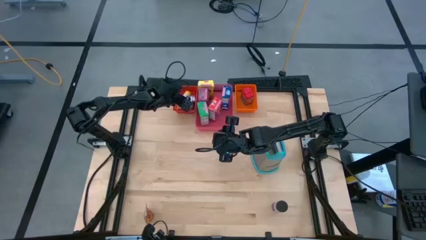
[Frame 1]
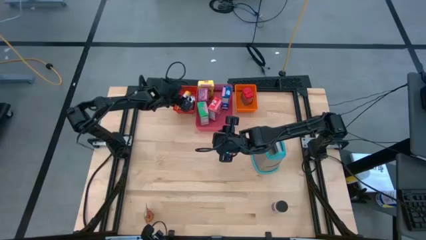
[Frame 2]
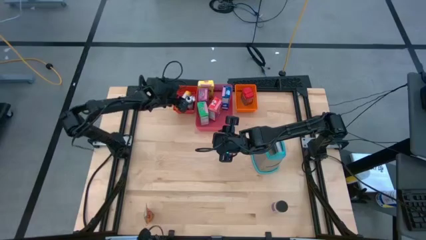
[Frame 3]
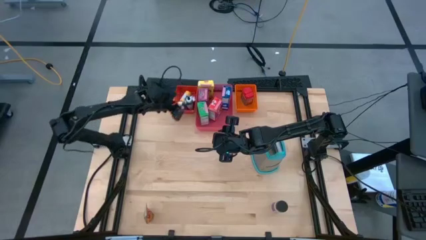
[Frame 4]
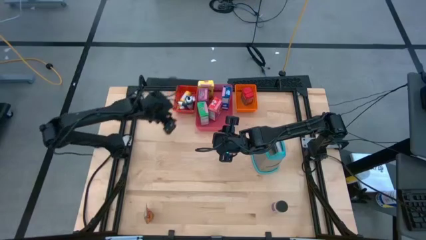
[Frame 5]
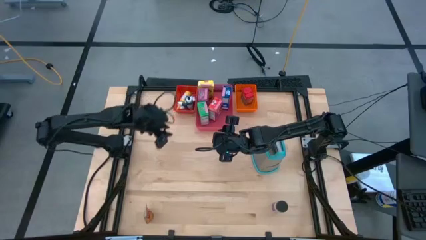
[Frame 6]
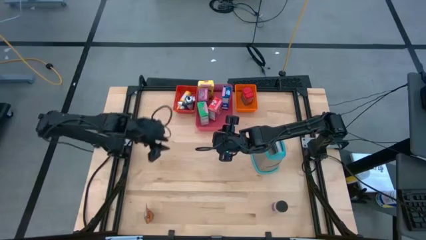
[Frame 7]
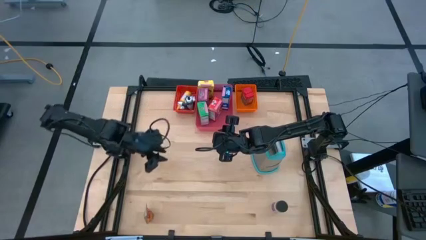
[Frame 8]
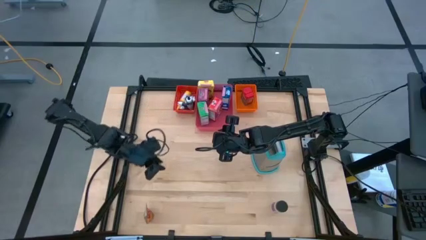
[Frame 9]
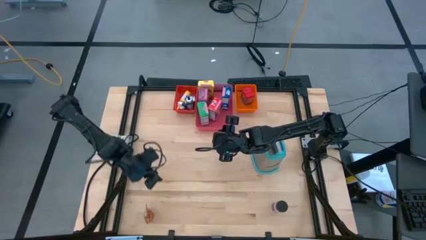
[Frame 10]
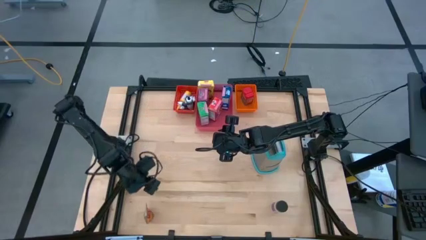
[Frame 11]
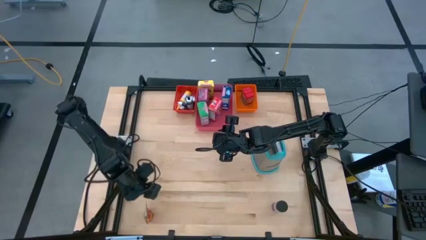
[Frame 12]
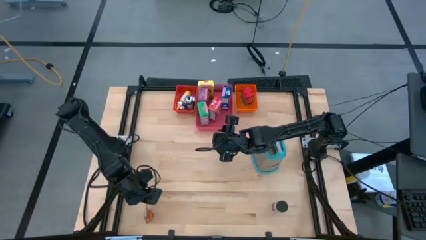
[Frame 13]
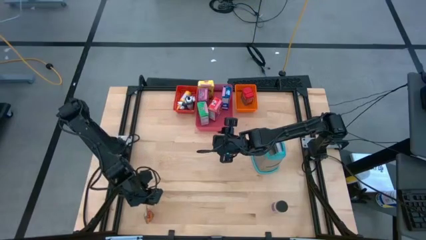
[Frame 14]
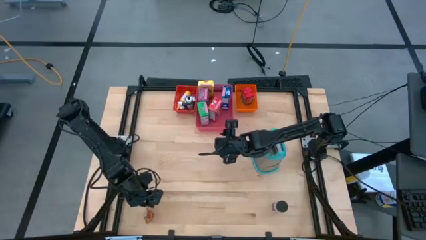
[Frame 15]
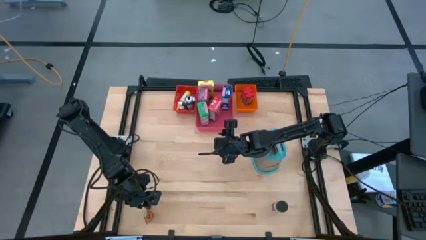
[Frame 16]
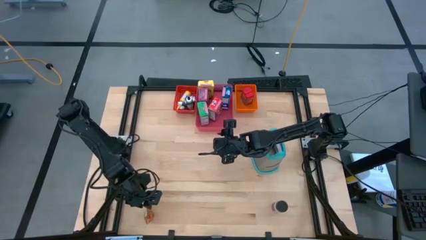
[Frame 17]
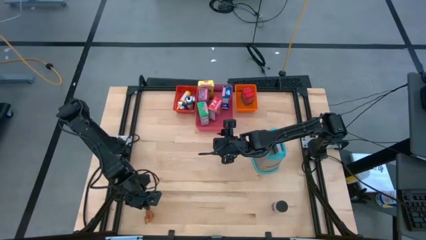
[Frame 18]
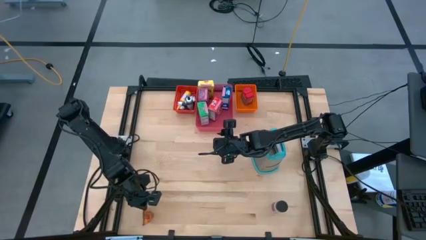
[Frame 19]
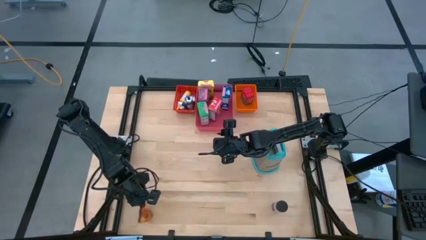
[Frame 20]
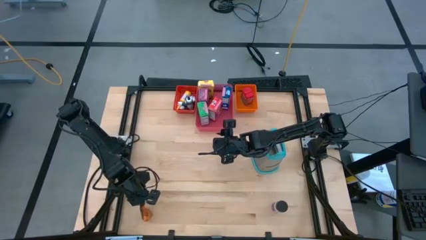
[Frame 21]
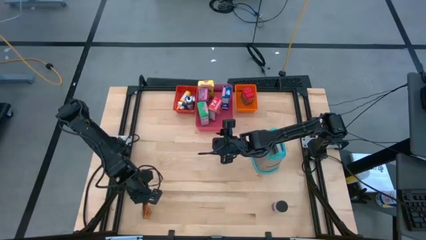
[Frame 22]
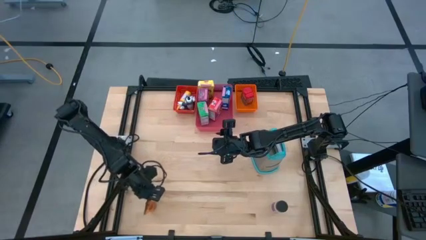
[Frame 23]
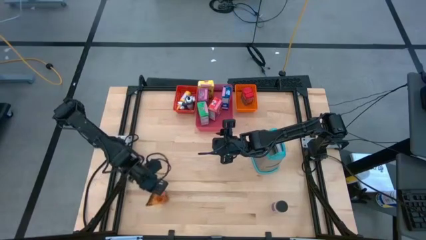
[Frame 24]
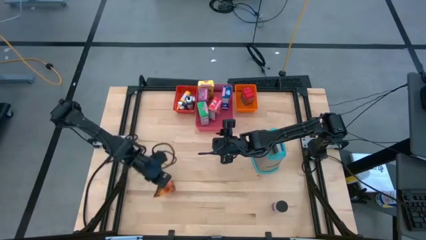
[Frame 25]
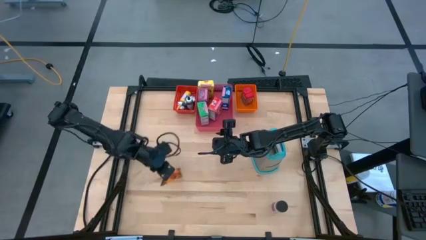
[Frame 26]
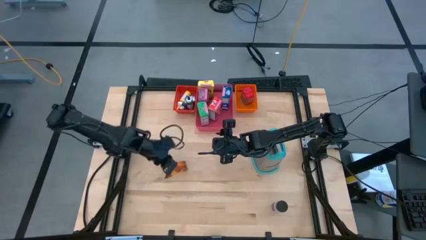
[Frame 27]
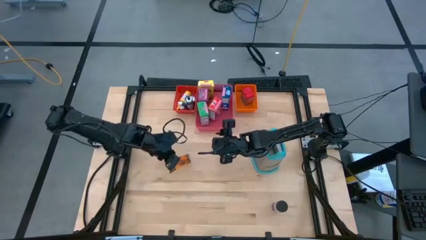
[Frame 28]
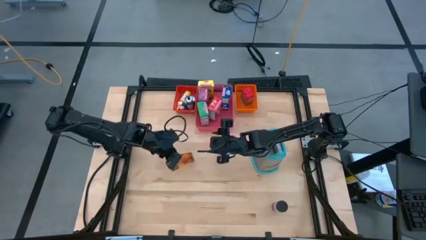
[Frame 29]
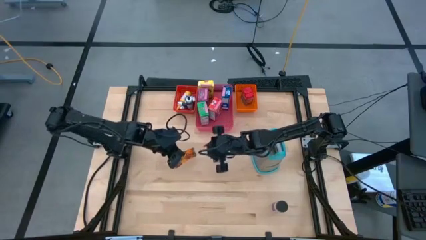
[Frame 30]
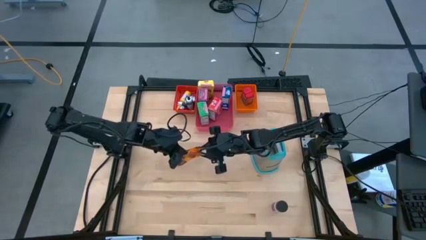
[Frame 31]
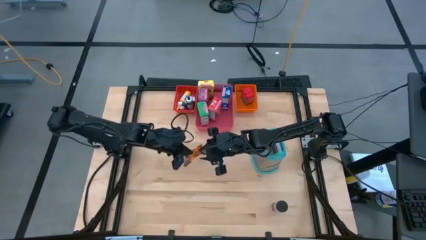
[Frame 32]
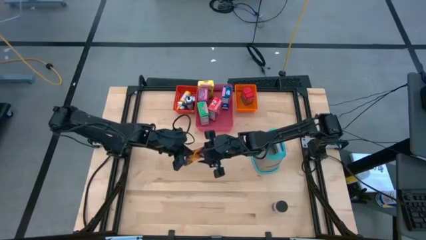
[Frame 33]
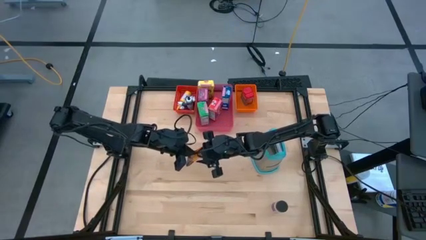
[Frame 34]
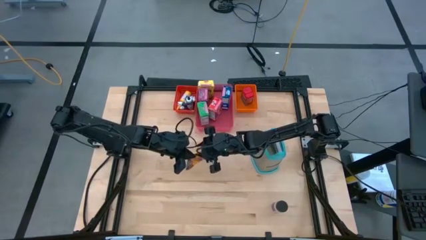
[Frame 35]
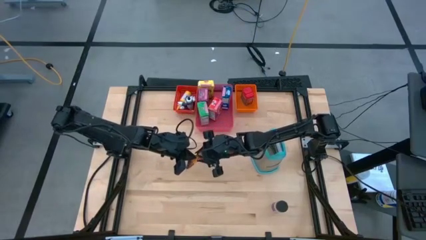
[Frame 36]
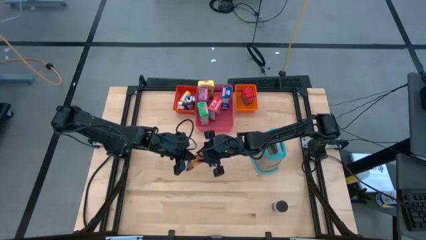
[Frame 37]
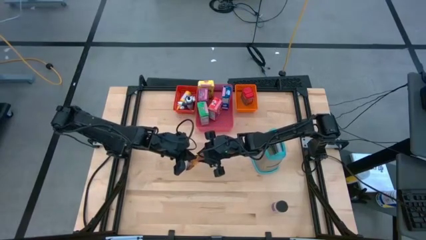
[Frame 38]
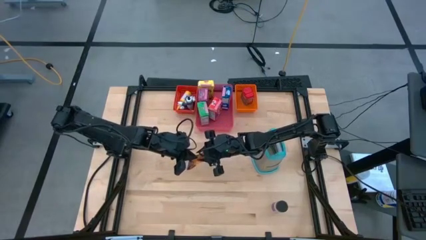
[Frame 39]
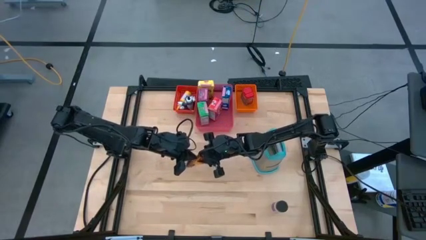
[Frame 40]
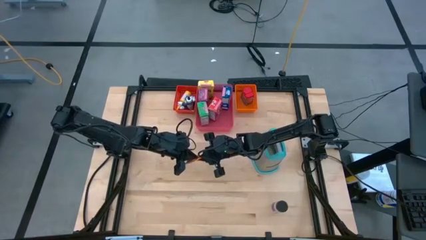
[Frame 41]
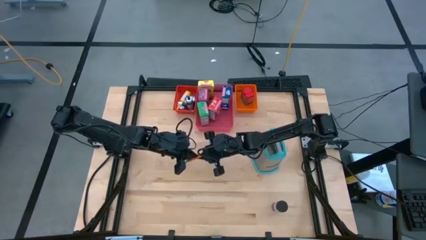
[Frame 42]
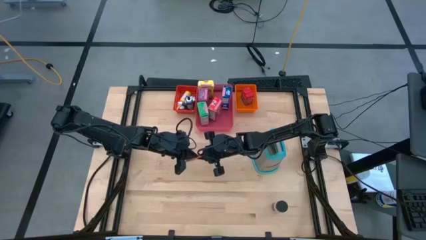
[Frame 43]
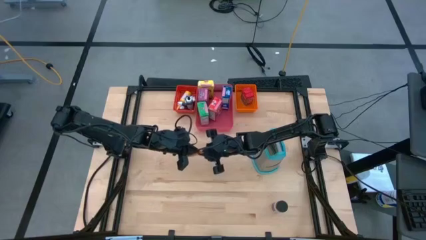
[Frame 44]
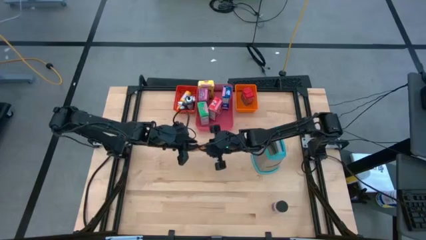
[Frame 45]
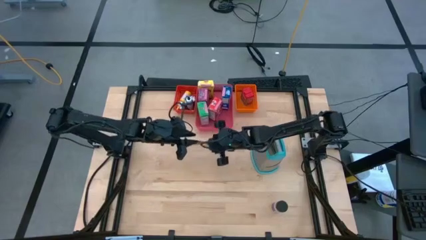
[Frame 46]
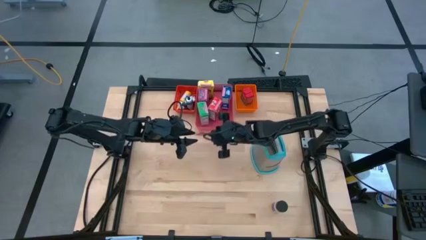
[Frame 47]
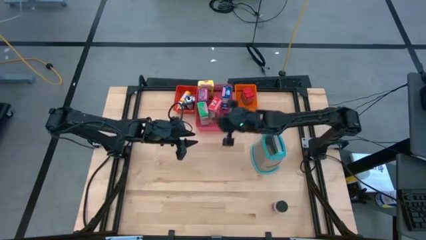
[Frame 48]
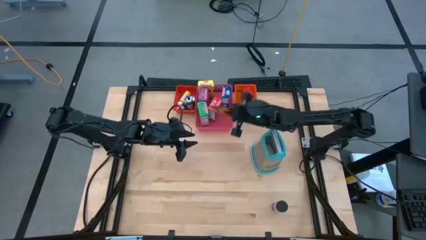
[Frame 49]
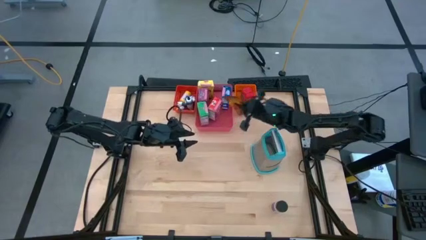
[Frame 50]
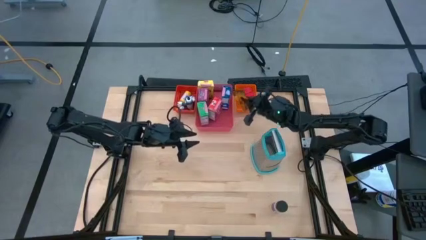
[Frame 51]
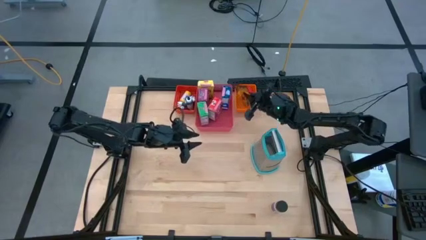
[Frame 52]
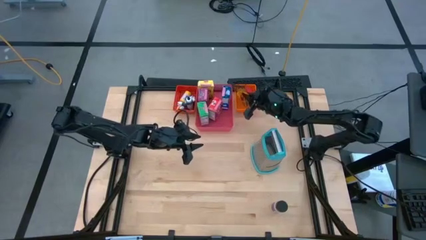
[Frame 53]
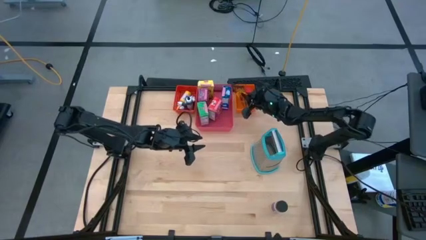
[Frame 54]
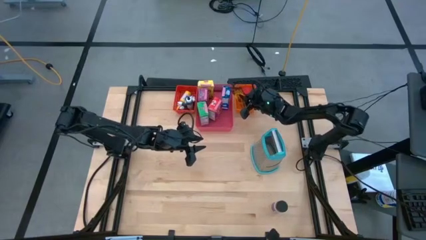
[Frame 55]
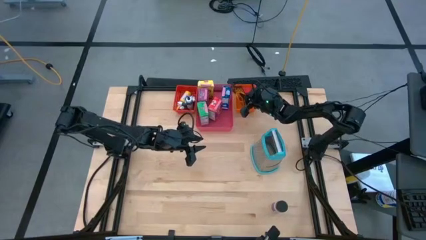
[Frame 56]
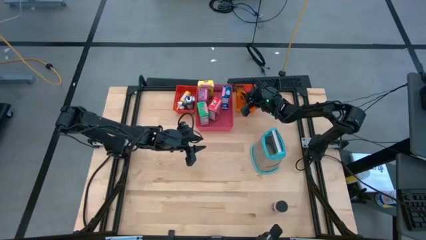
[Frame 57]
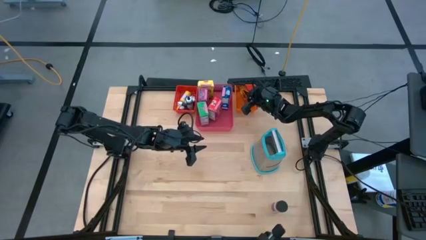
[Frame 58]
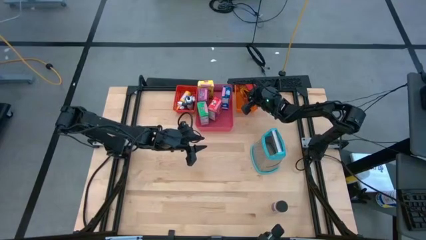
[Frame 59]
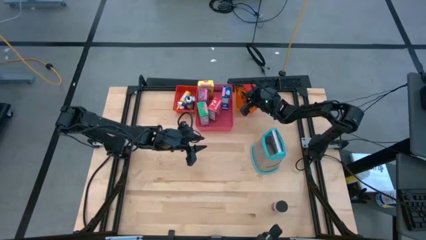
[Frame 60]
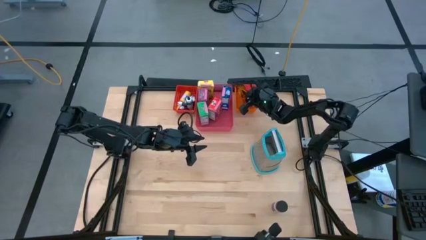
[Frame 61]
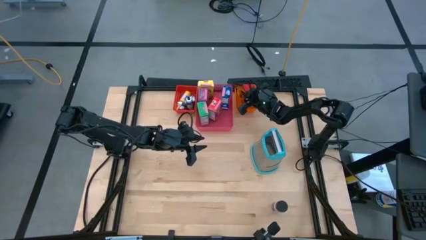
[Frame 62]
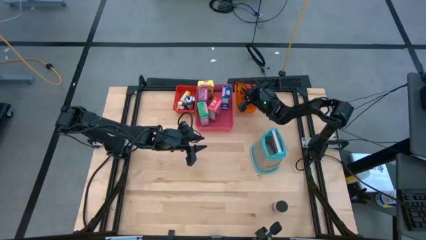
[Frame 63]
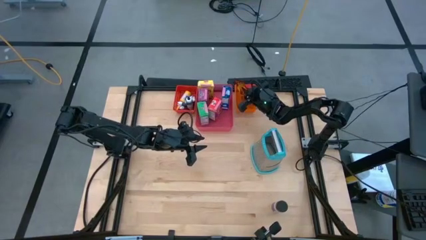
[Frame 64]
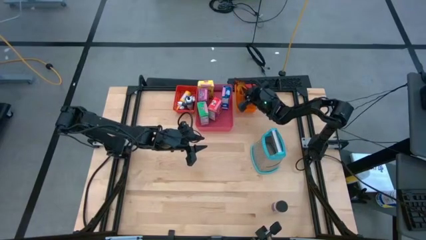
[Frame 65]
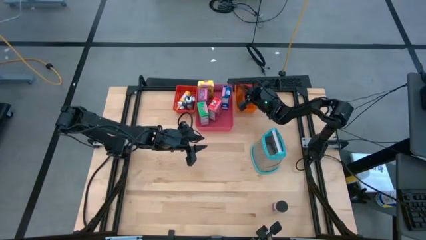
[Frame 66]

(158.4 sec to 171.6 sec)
Task: Pick & Place Kitchen Items
Put the orange seasoning pack into the orange bin

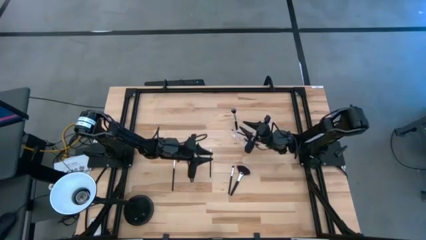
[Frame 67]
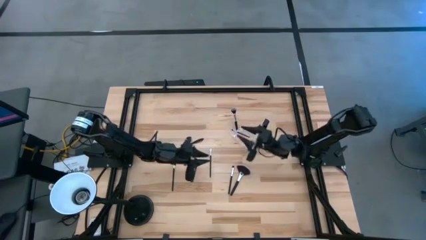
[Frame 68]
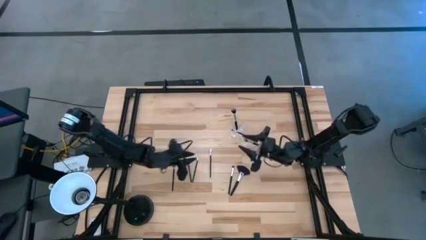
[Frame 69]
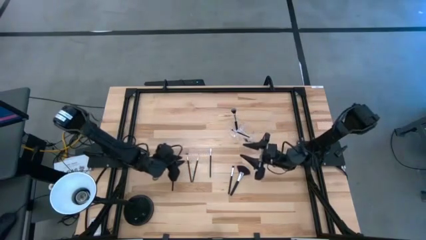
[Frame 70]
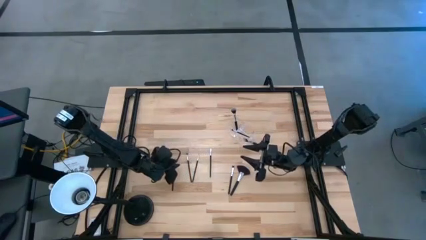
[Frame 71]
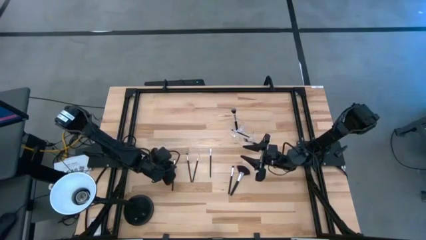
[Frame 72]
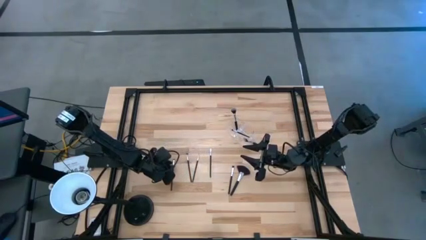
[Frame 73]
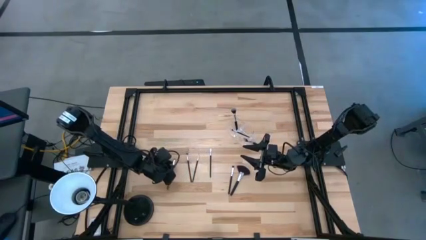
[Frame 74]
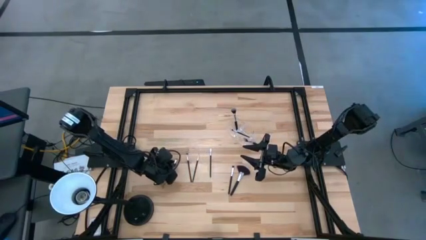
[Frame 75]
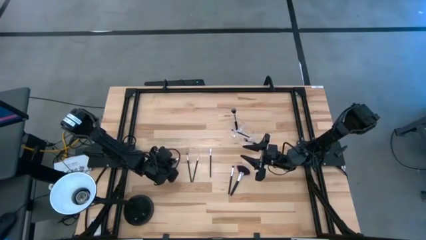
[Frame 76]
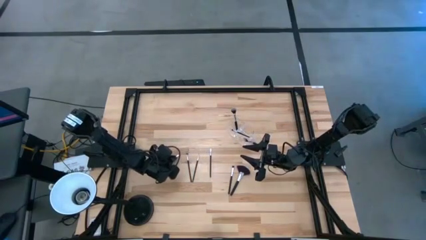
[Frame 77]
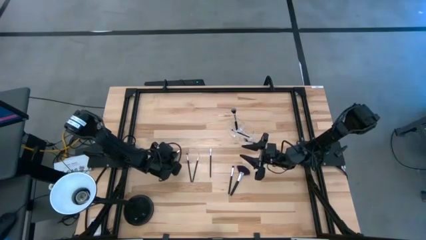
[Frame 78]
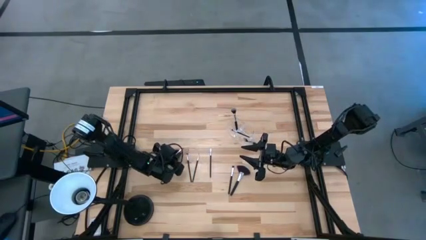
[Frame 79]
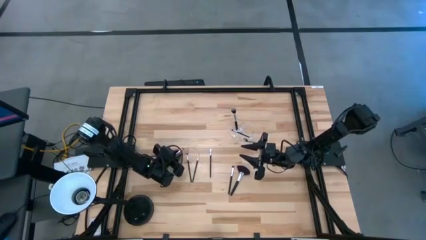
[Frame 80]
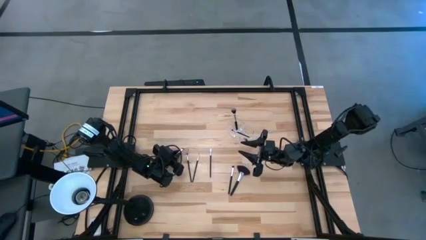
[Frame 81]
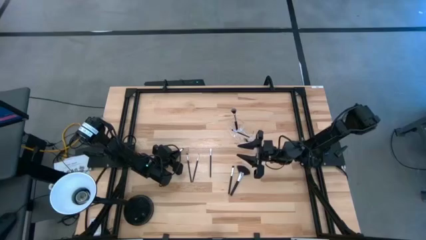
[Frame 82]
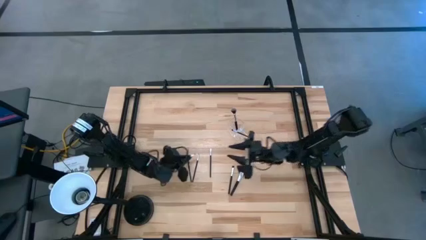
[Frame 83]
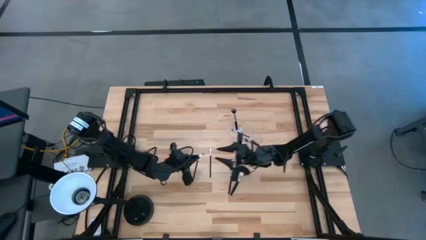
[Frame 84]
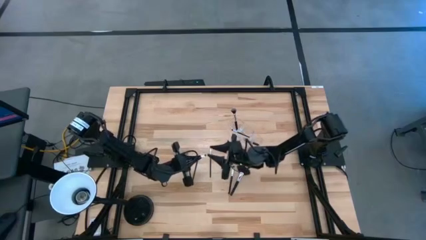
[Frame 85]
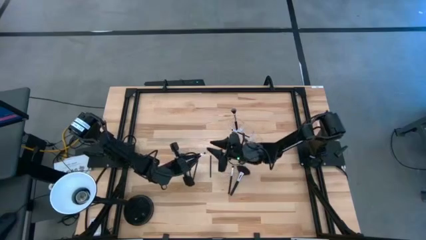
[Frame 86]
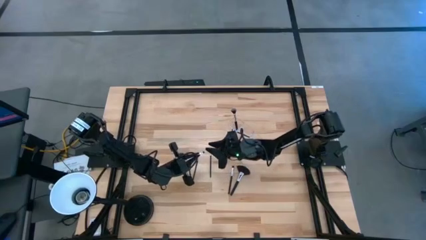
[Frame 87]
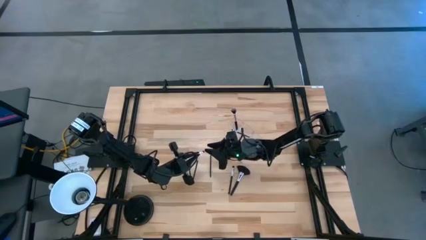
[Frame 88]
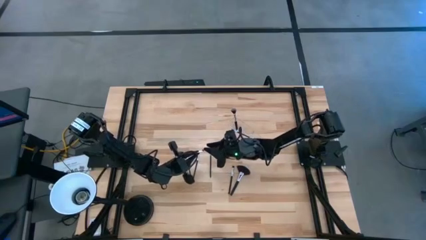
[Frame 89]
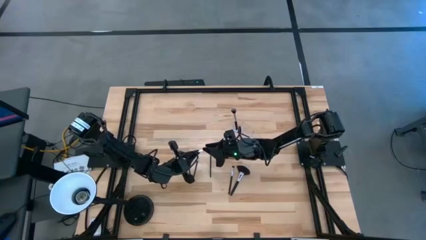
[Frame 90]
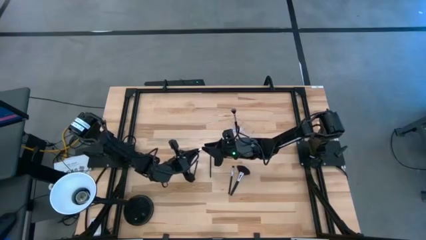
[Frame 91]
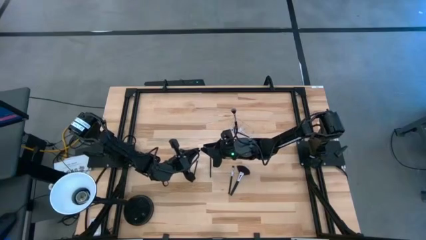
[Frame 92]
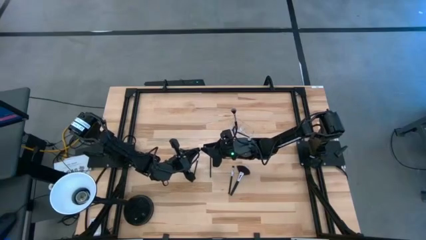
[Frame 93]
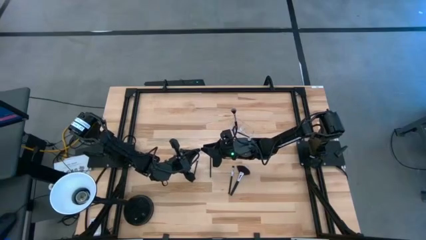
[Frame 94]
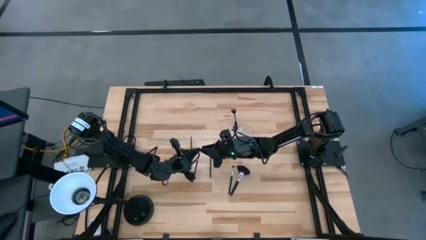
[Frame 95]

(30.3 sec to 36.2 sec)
Task: Put items in baskets/containers
Put the eyeshadow brush into the transparent organizer
